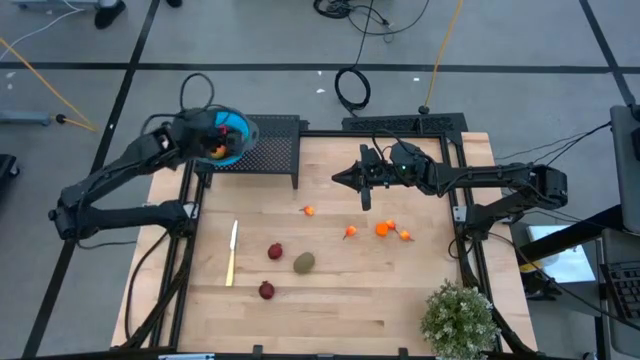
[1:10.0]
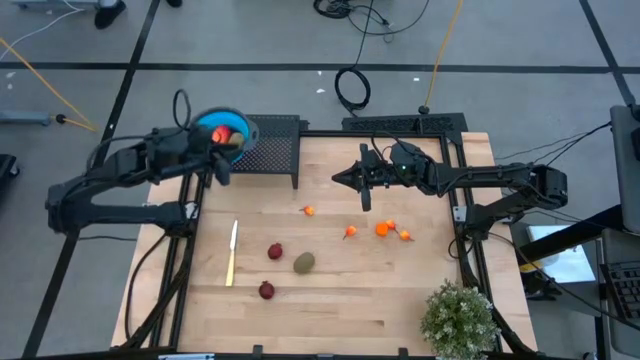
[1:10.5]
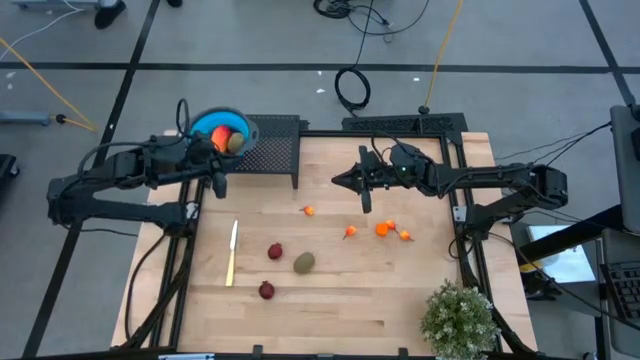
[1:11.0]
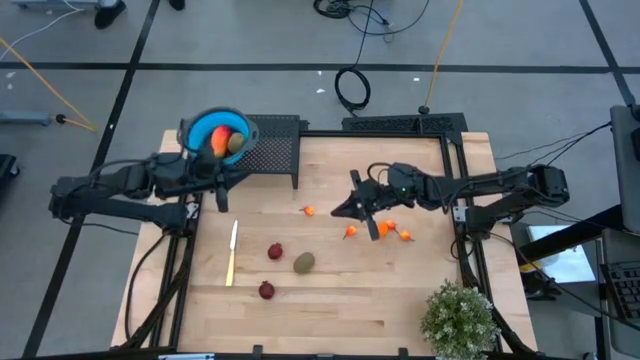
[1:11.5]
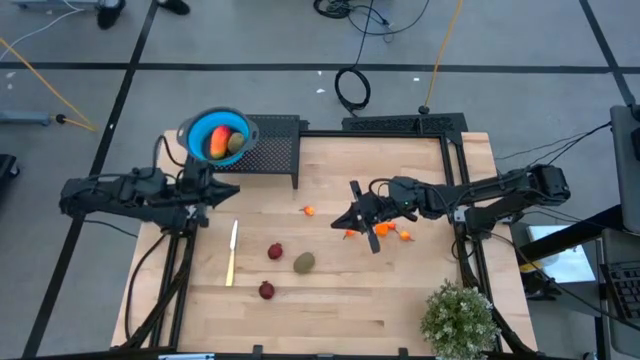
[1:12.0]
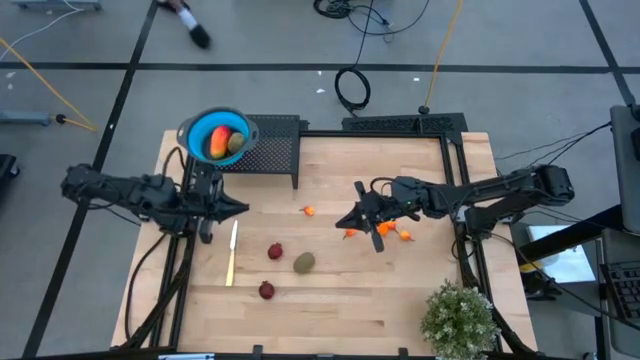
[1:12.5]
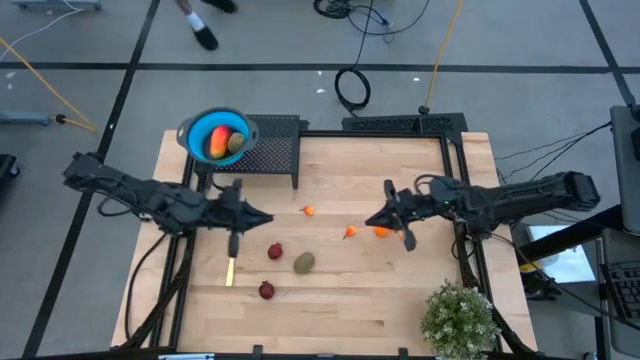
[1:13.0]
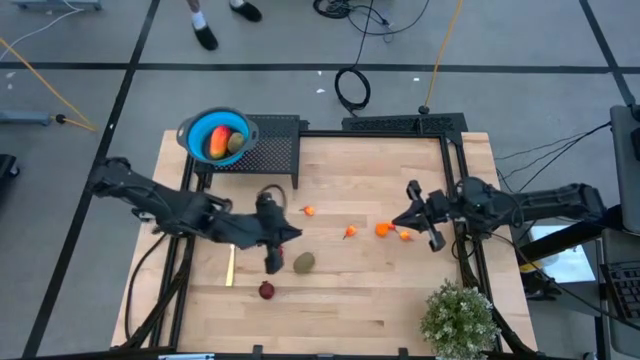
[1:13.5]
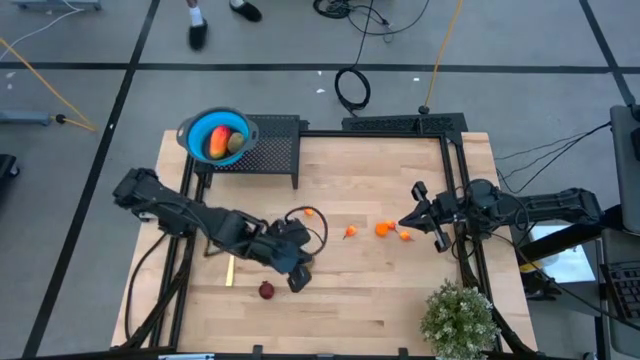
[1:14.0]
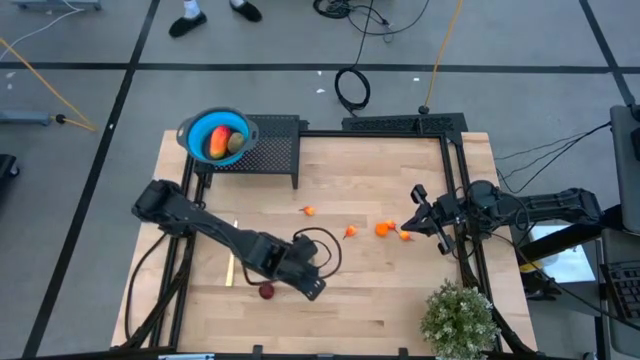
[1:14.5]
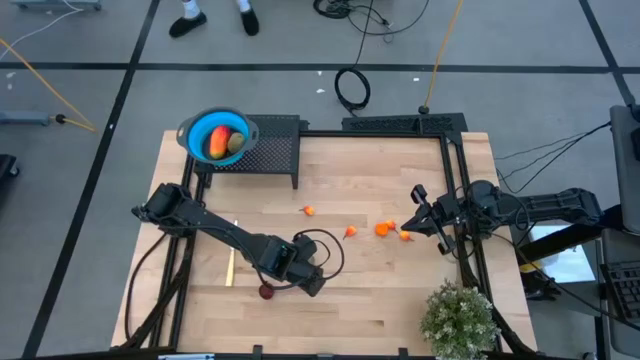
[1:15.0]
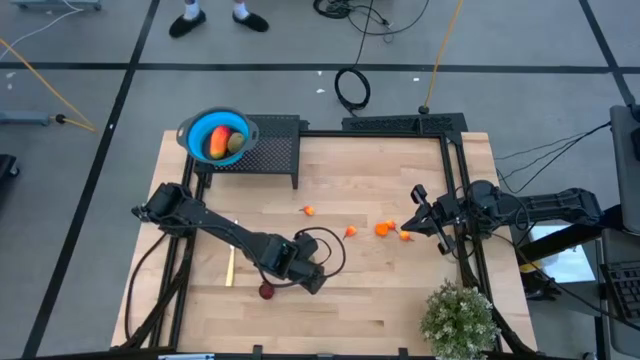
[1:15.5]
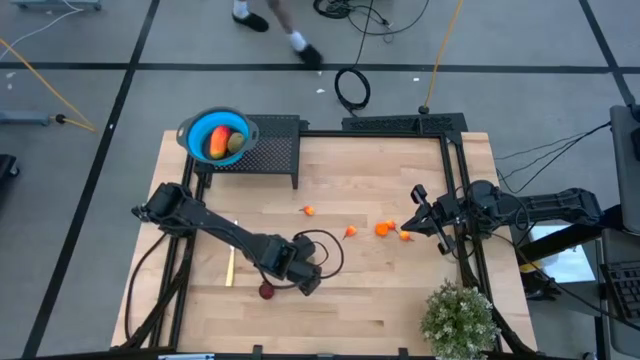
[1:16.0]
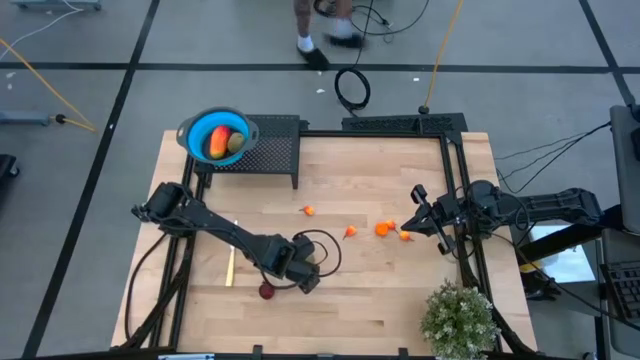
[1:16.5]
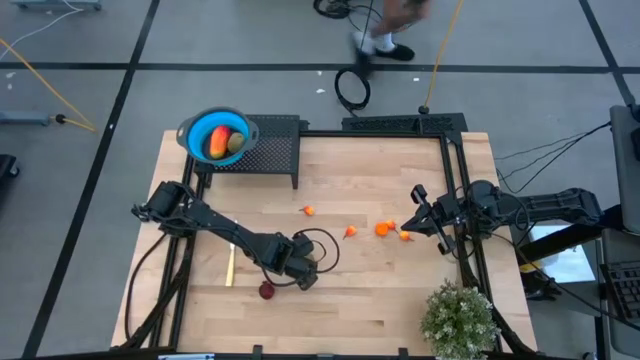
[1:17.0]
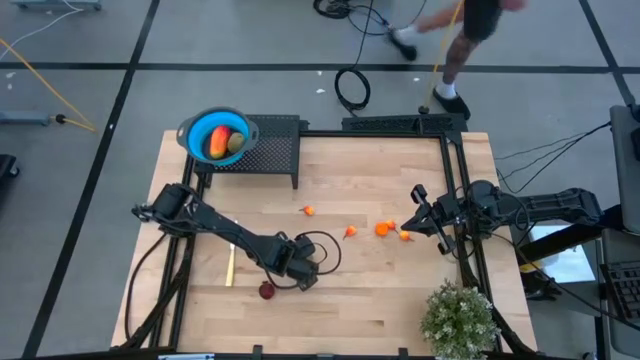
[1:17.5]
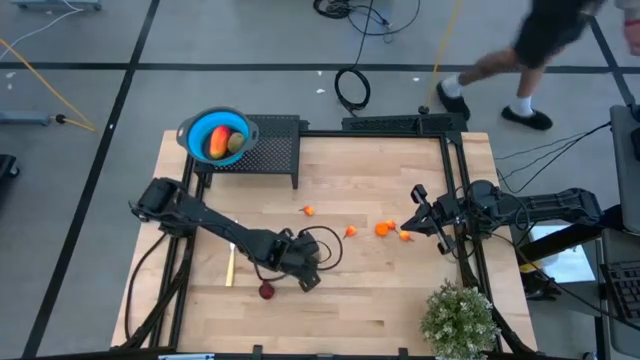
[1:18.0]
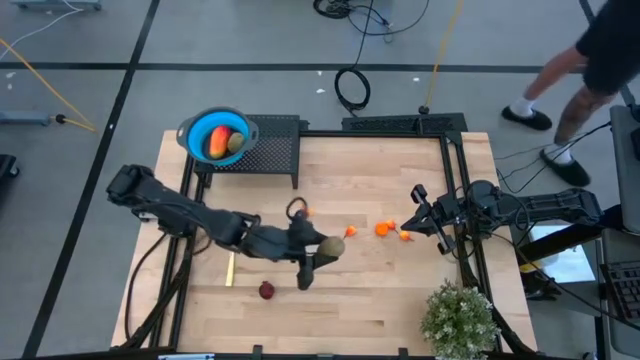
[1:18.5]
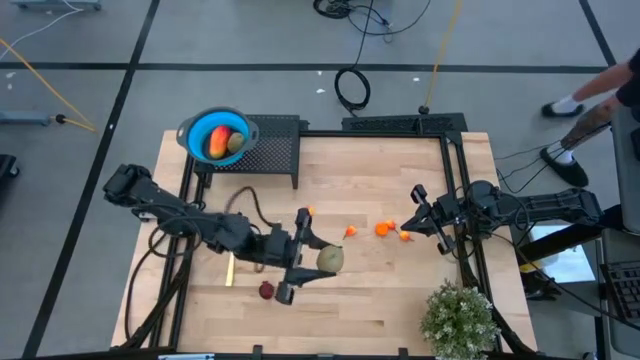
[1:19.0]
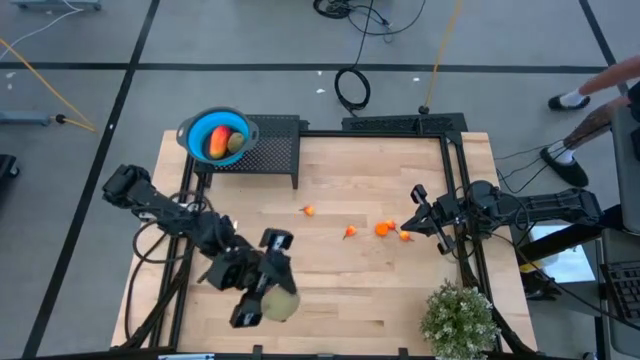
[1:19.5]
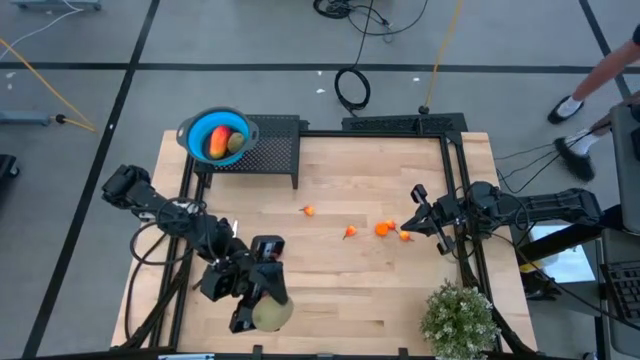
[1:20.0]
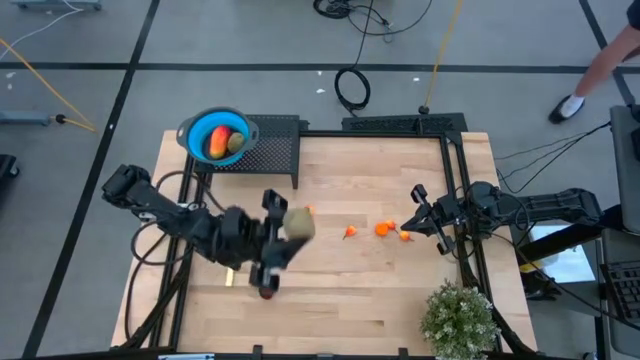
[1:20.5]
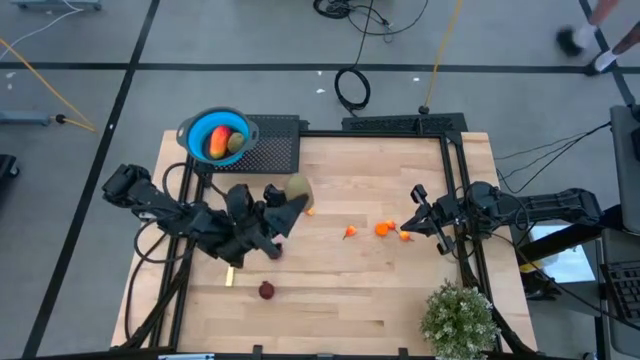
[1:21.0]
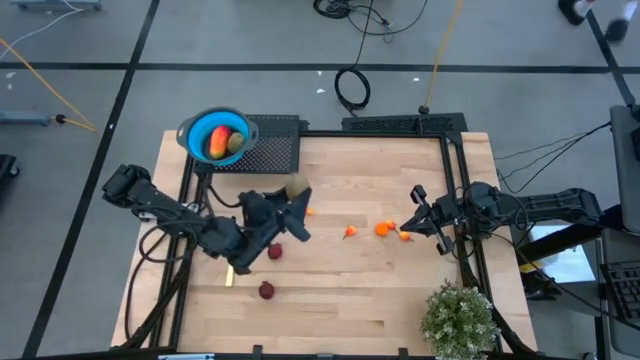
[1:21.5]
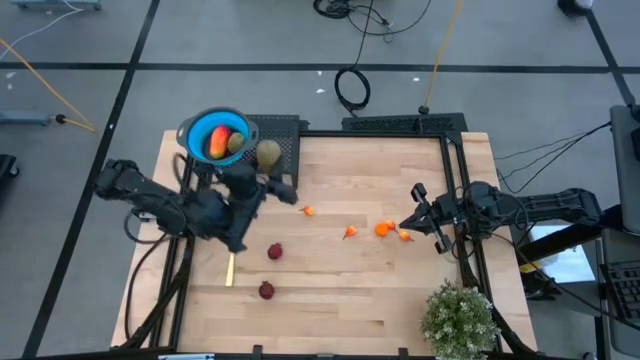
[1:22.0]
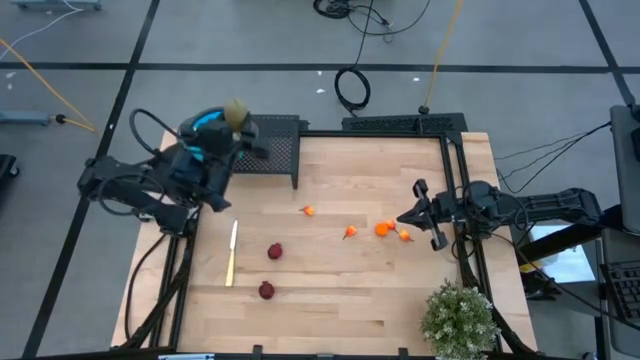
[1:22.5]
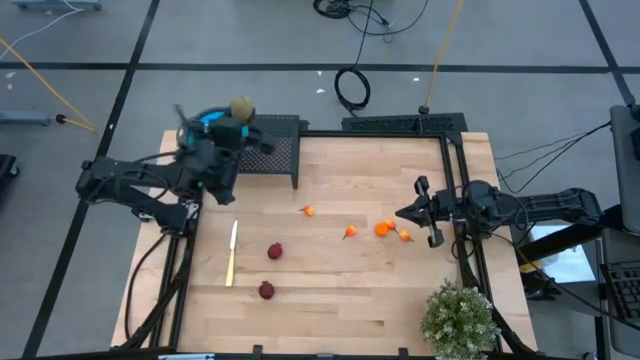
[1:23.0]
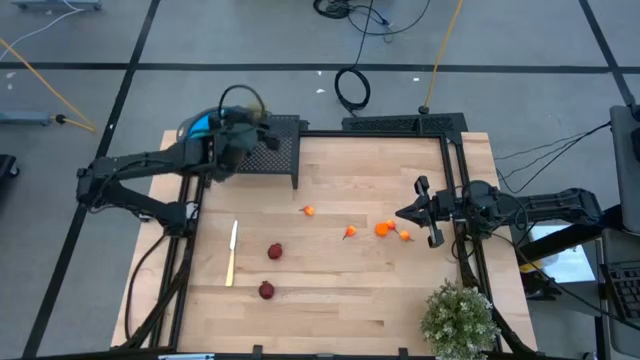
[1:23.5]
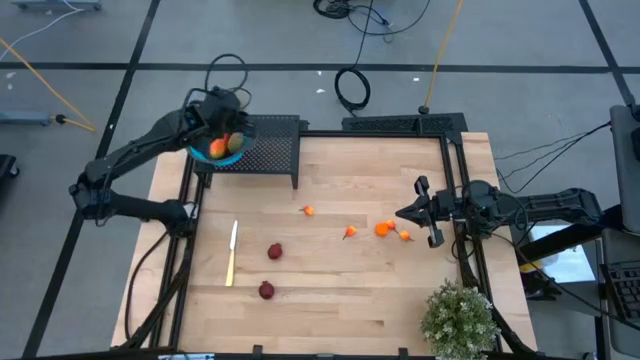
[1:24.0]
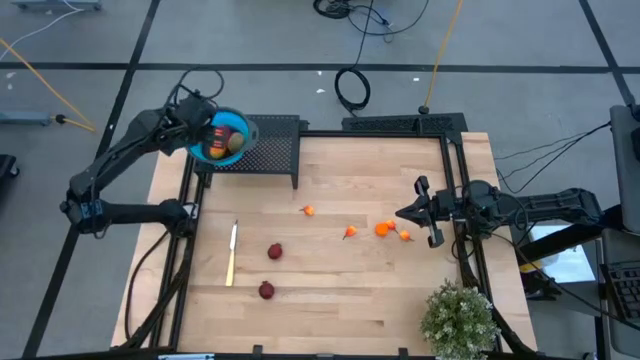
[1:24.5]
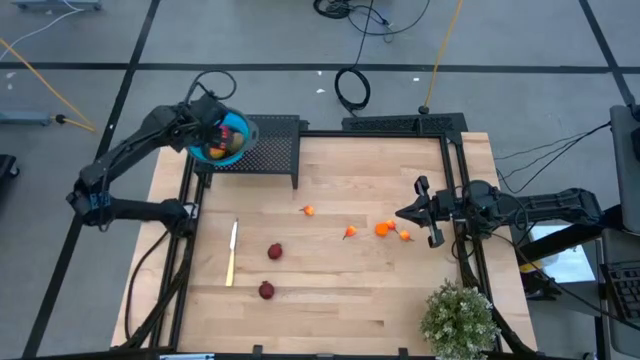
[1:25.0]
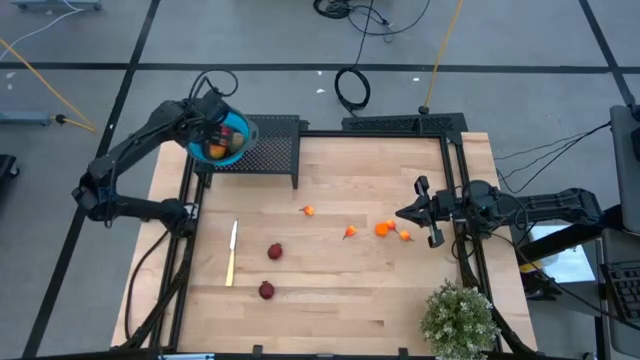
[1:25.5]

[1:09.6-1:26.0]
Task: Pick & Place Fruit
Put the kiwi into the blue strainer bowl on the shelf
